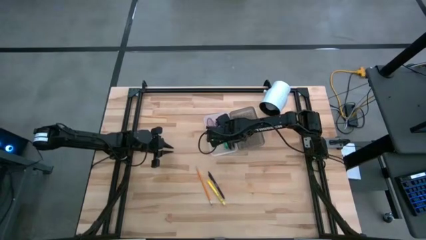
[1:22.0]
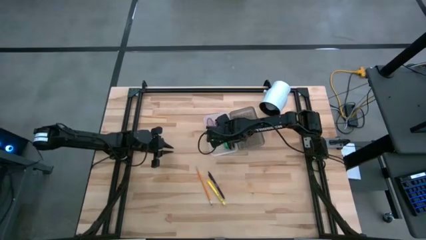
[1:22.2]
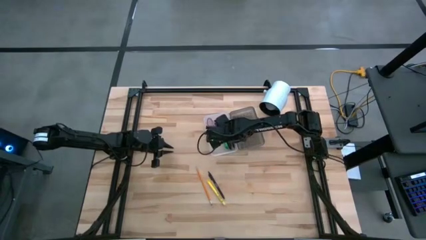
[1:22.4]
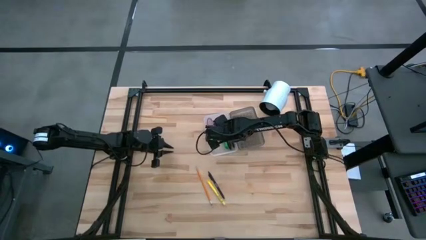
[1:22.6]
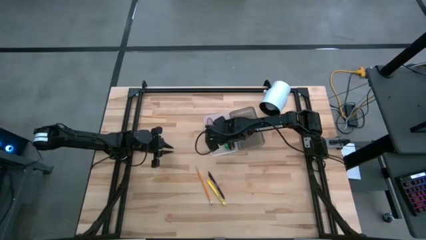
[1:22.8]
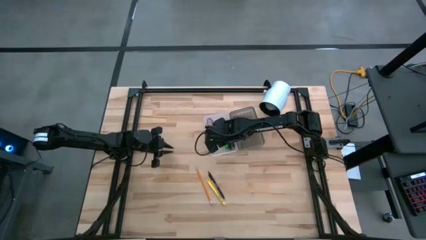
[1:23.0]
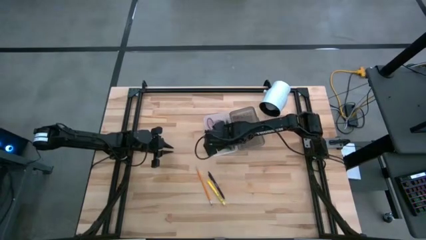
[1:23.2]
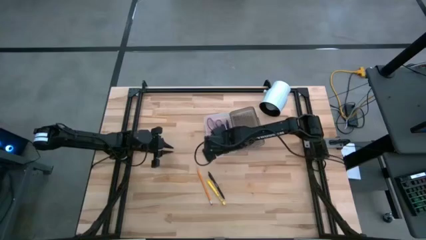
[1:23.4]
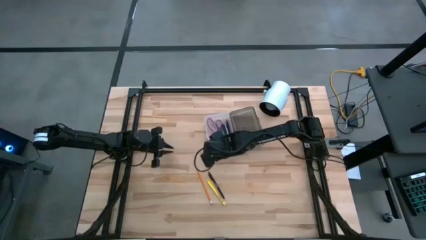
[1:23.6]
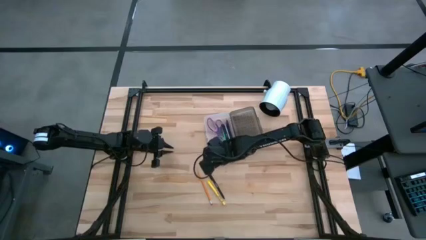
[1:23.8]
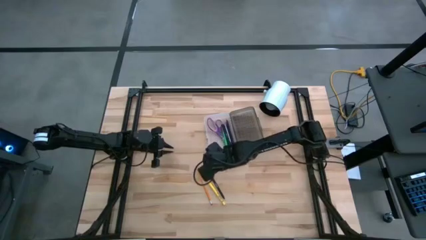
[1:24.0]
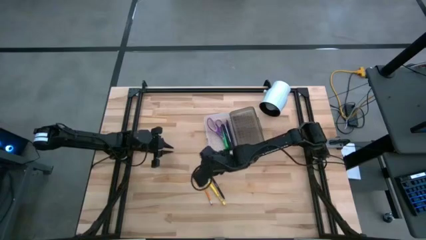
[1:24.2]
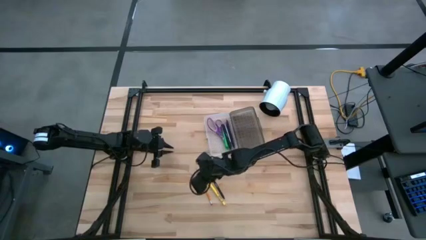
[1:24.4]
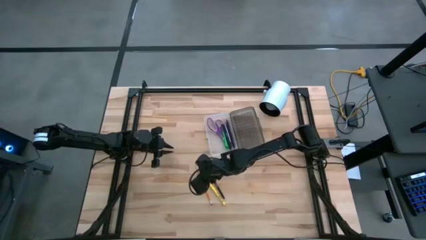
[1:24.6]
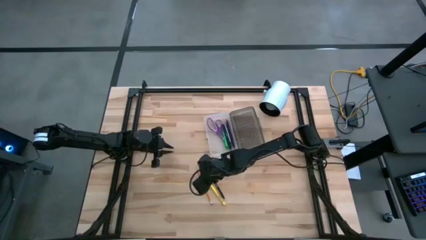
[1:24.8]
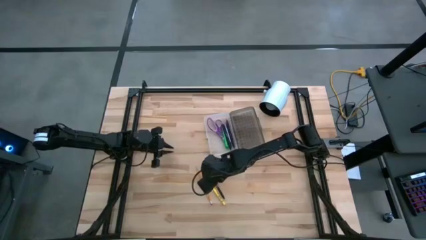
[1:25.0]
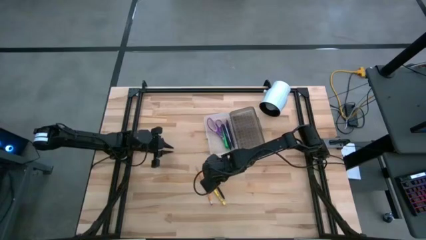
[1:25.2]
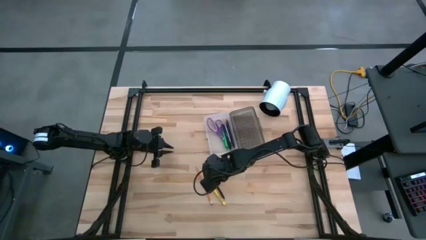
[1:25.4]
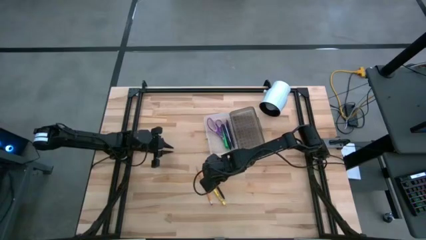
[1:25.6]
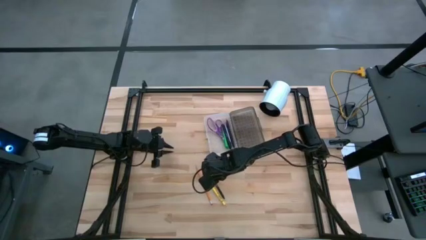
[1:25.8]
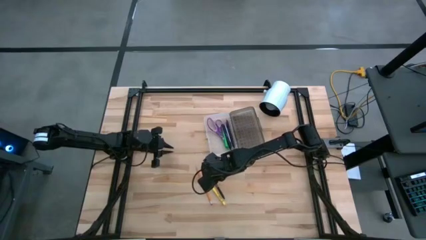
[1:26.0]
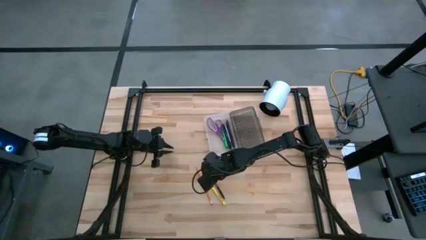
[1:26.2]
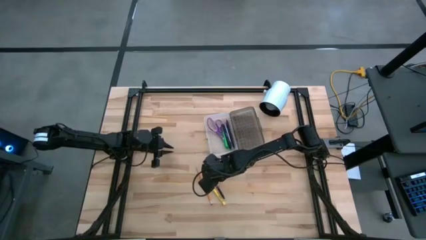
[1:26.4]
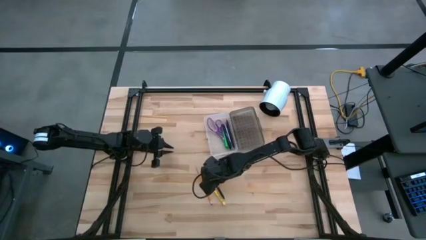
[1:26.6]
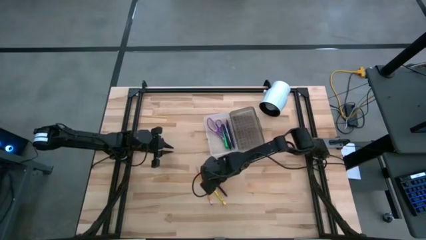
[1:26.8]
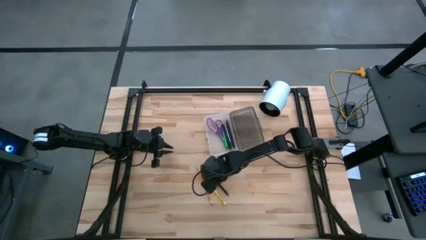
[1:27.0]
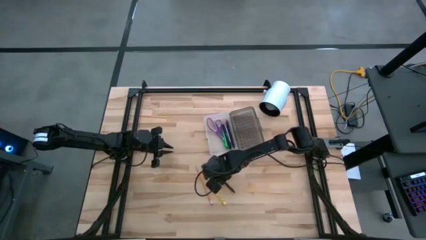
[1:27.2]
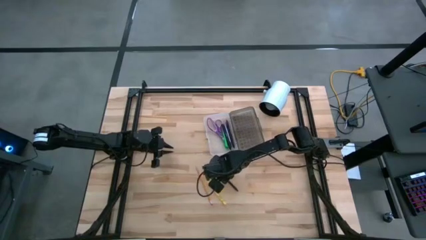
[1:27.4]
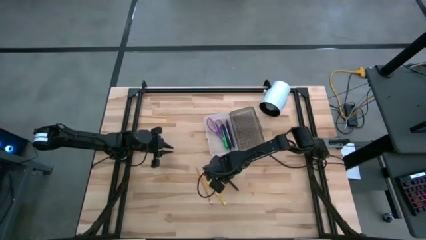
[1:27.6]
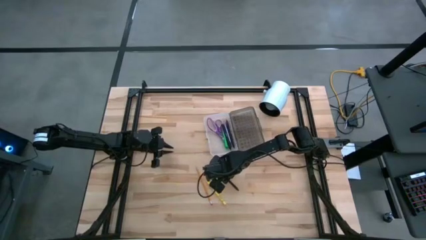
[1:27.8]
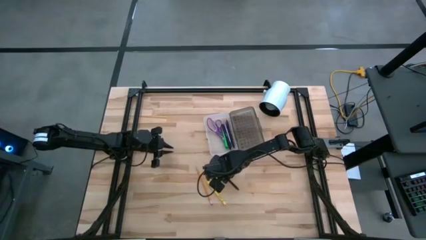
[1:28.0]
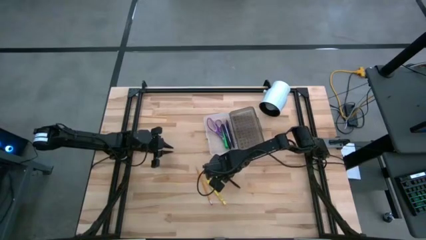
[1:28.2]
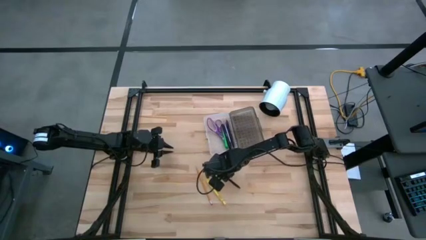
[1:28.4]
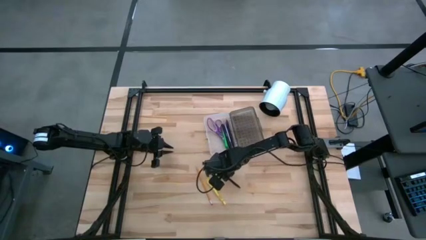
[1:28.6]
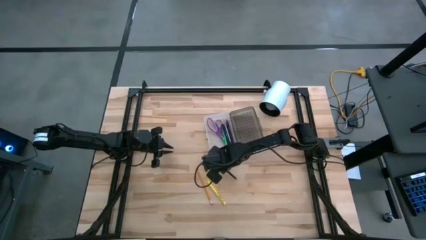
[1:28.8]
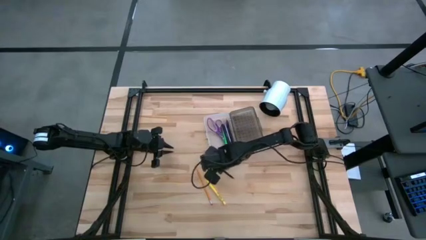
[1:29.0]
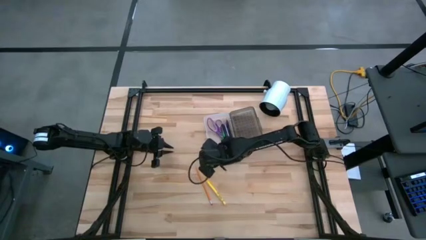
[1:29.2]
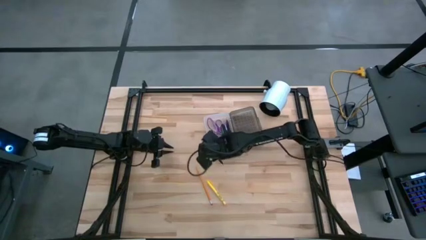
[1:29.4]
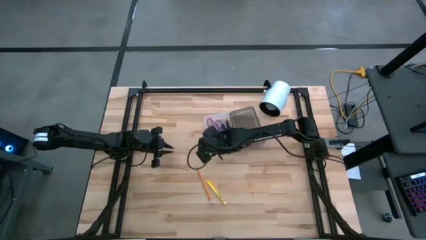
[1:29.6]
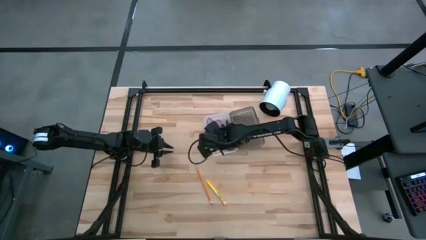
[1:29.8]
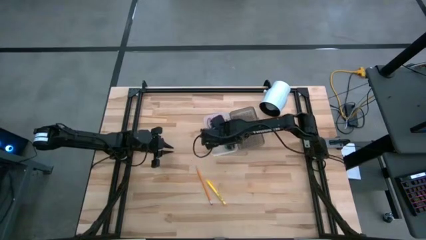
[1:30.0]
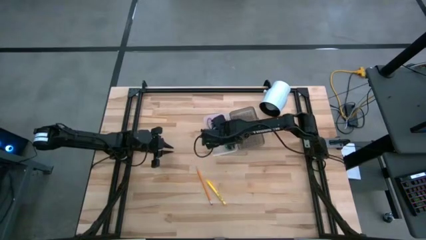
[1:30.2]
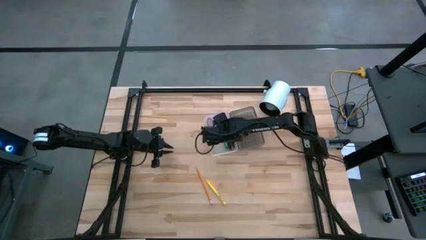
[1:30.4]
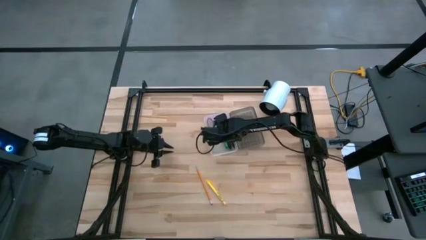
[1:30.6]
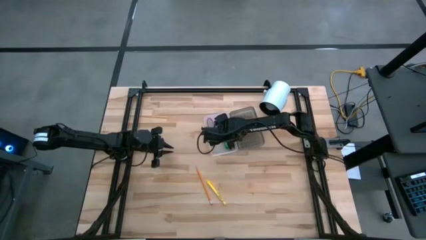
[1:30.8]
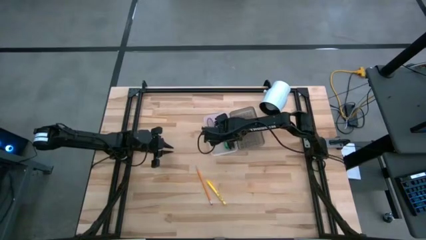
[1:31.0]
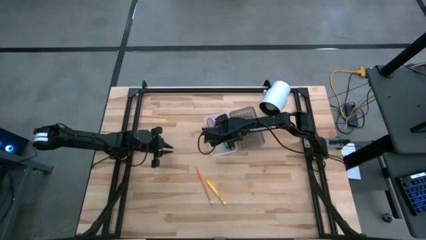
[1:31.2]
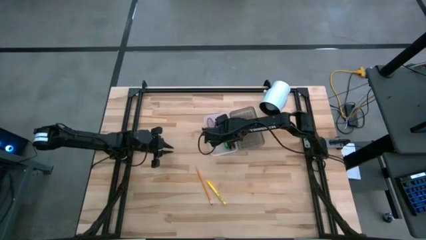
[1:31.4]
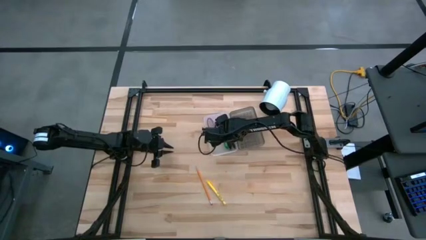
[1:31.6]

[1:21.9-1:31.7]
Task: Pick & place school supplies into a supply box
Put the black pen into the supply box
